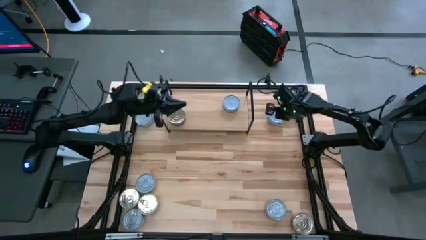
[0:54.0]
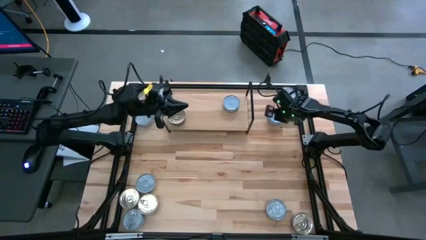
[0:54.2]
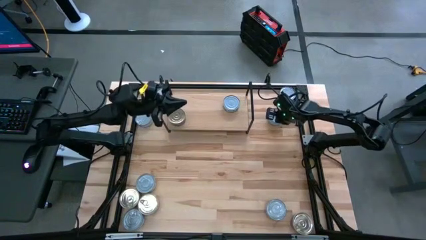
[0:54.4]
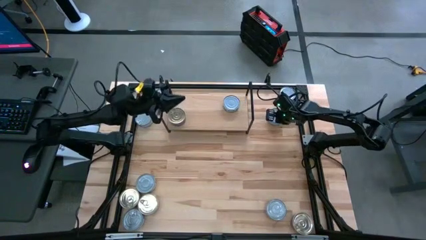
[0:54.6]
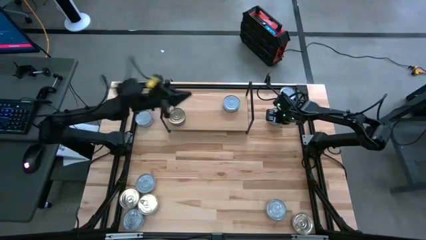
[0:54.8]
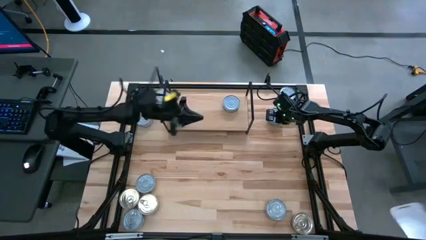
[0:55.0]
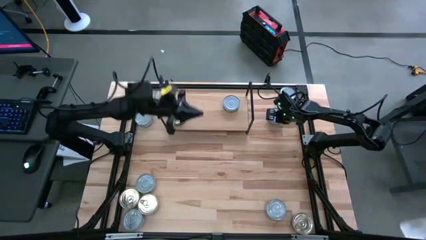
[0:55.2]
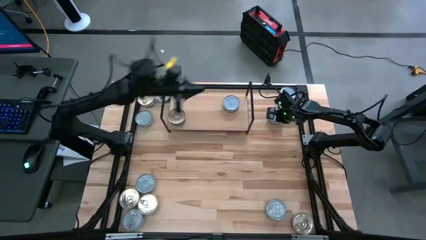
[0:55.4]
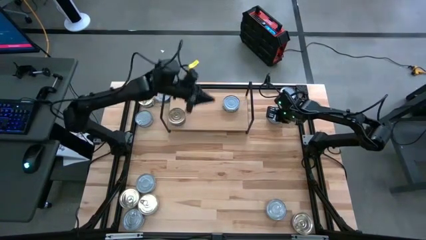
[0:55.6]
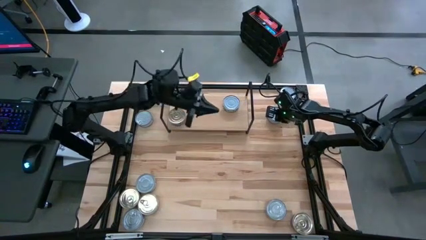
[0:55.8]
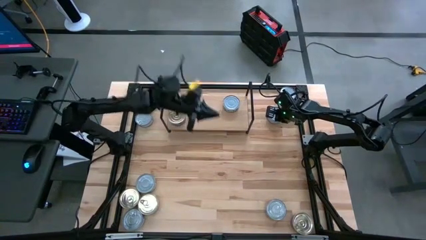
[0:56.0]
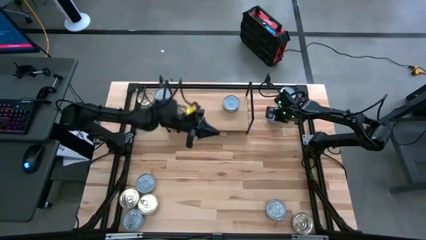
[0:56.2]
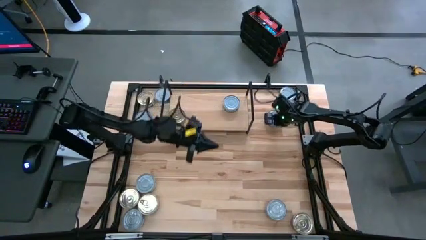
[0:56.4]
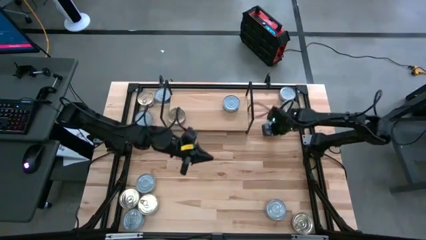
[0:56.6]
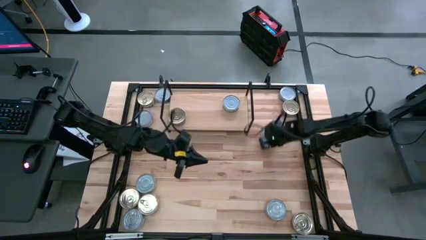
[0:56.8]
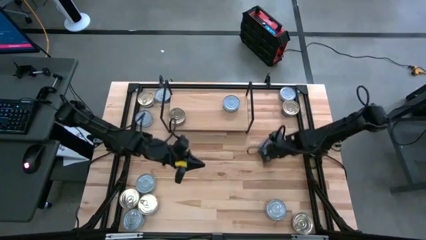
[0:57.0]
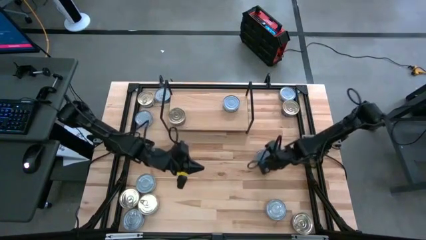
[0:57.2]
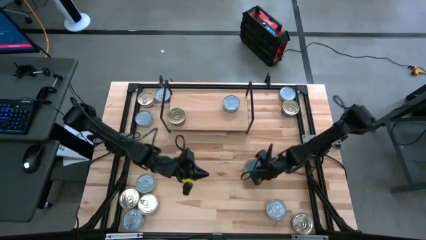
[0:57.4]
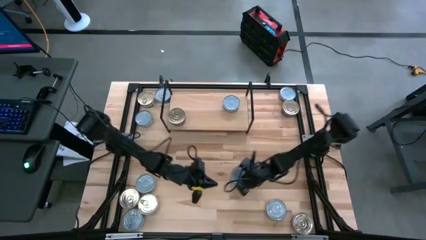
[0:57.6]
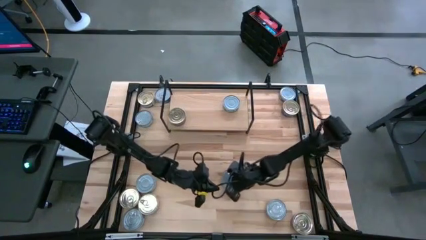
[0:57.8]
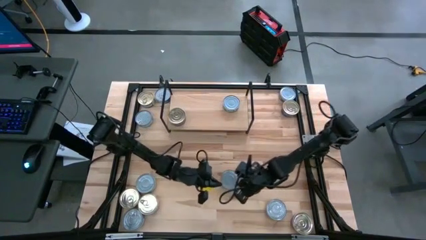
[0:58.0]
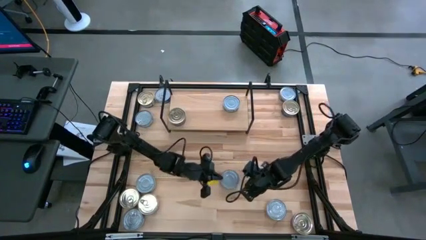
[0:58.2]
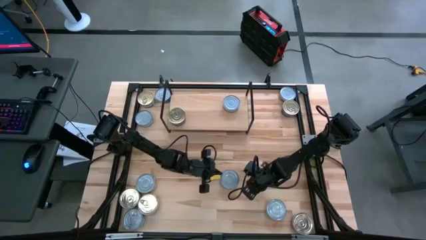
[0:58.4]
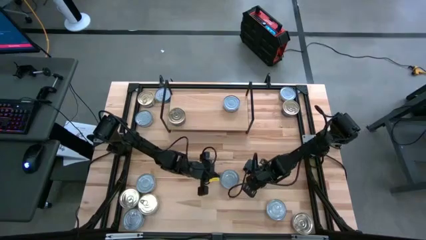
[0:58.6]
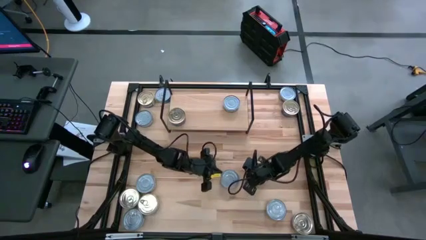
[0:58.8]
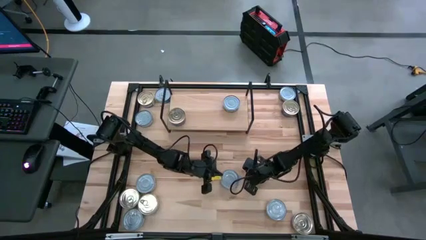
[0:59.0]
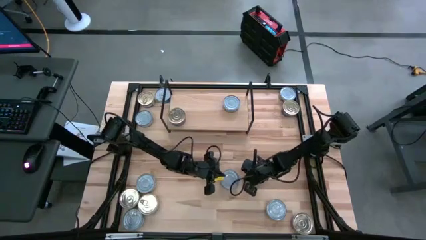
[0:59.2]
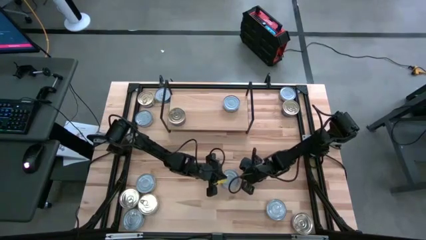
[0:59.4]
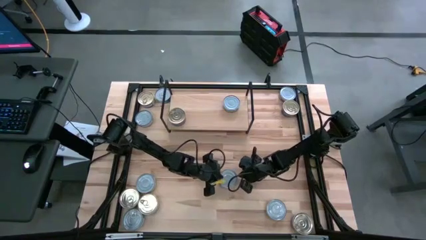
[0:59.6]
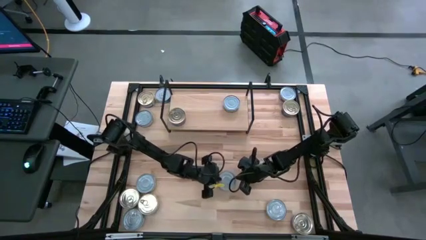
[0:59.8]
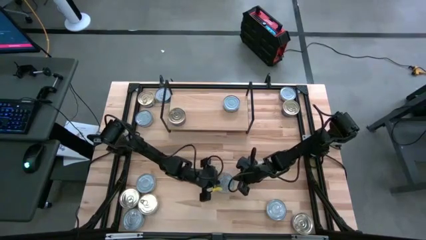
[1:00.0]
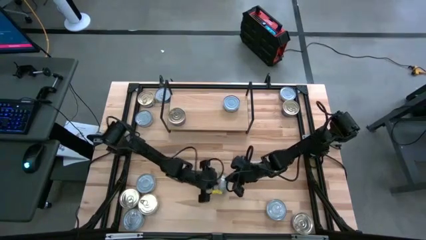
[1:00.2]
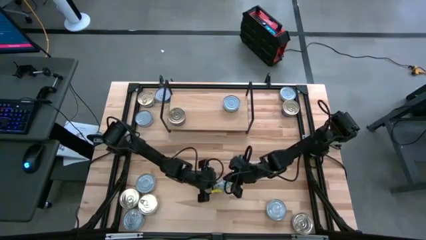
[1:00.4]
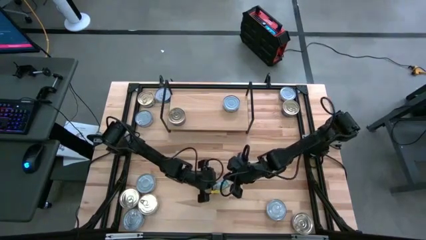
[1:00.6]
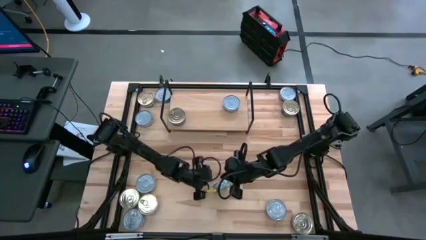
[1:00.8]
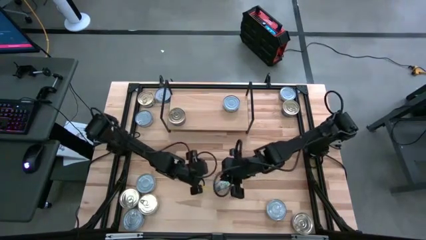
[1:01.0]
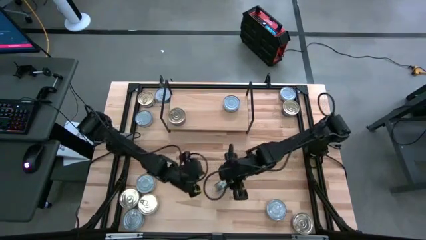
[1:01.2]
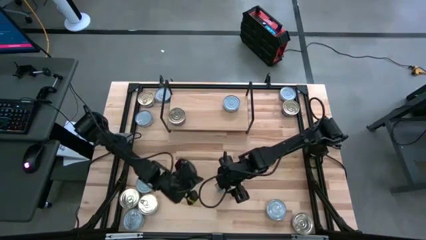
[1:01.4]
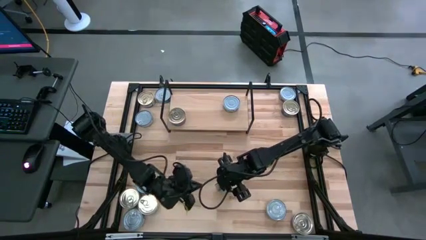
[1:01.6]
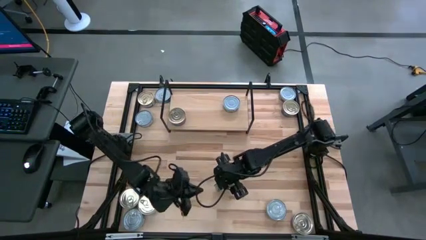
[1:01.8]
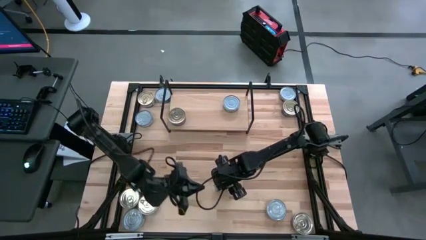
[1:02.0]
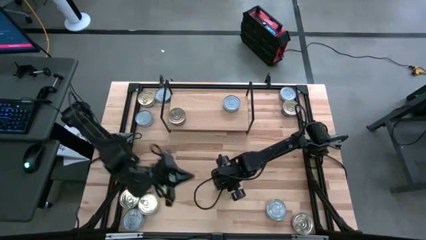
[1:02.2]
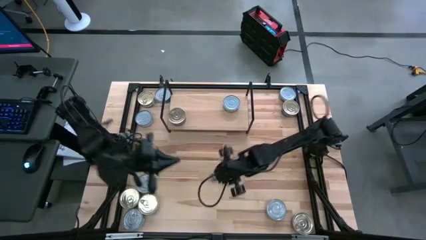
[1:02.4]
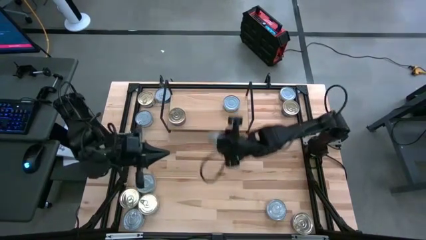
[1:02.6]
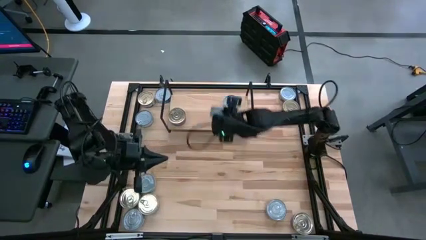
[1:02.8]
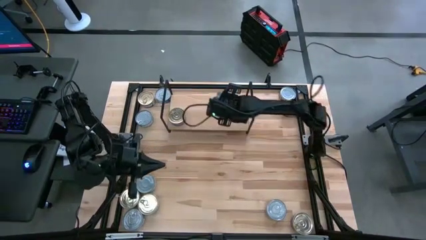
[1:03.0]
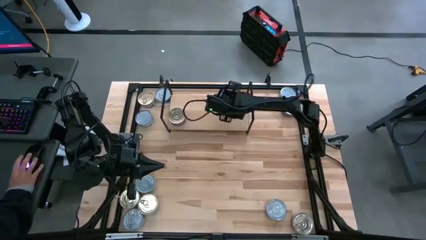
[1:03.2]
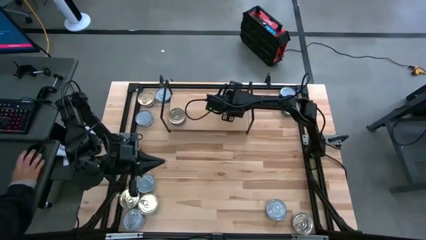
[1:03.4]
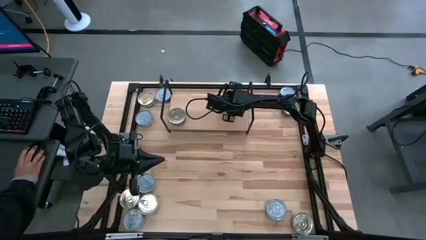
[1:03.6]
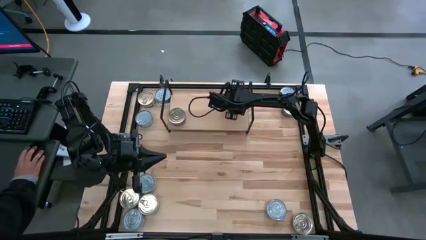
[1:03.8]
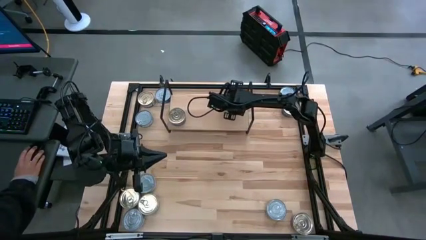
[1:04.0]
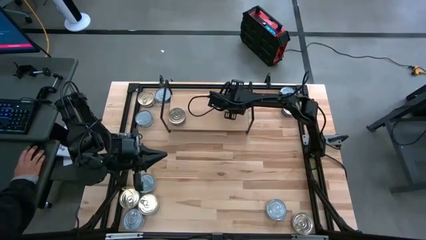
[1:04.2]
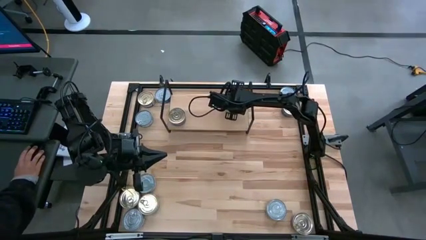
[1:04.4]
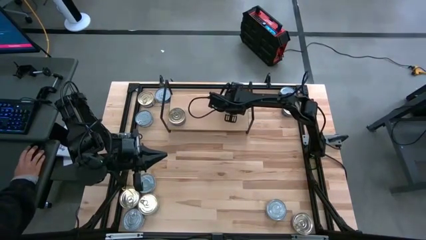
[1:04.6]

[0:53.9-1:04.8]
Task: Stack canned seafood by type on shelf
Stack the green tuna can on top of the other green tuna can on the shelf
